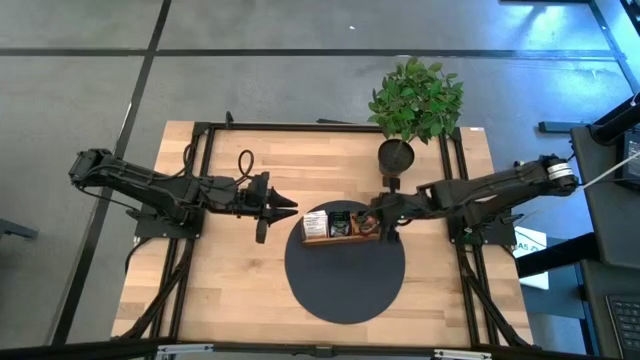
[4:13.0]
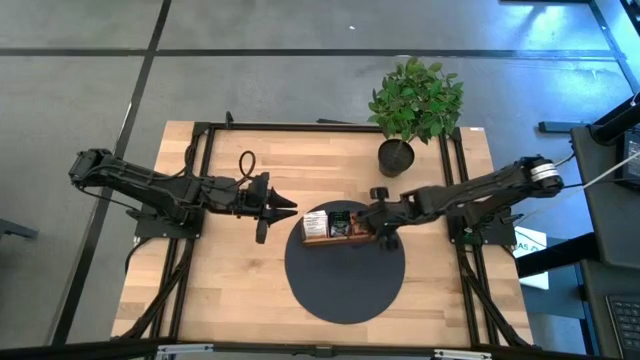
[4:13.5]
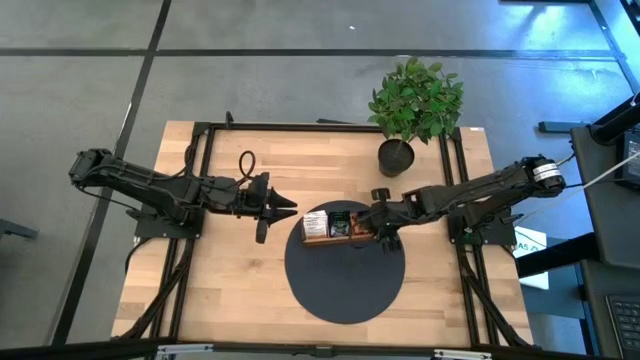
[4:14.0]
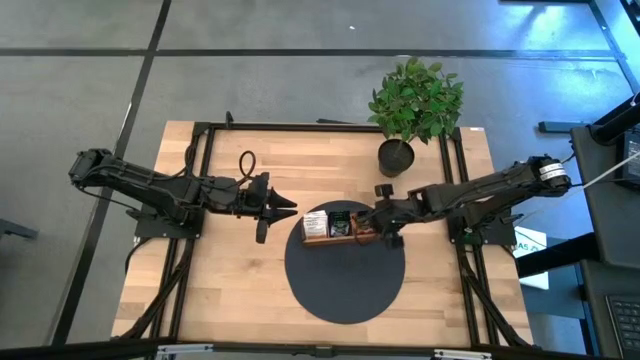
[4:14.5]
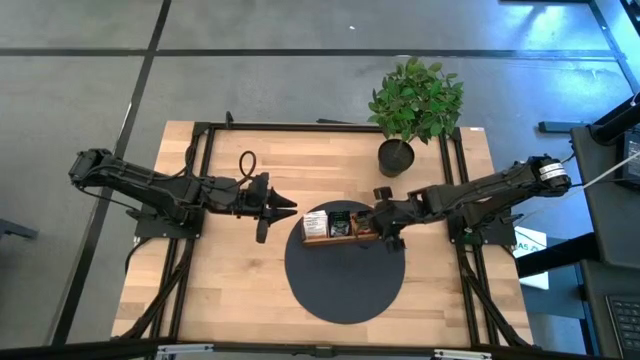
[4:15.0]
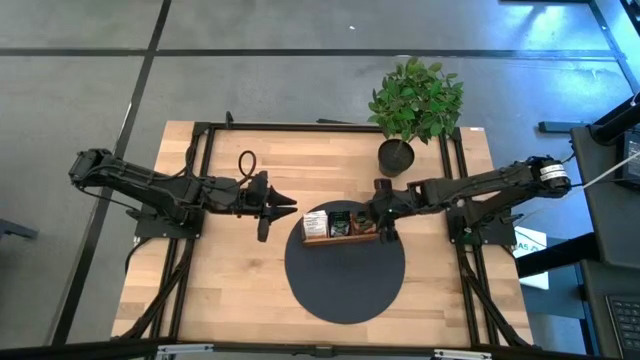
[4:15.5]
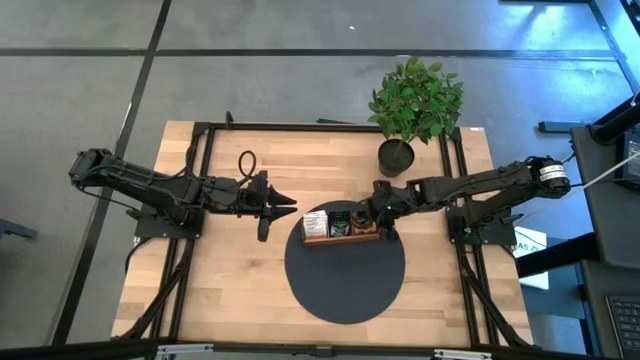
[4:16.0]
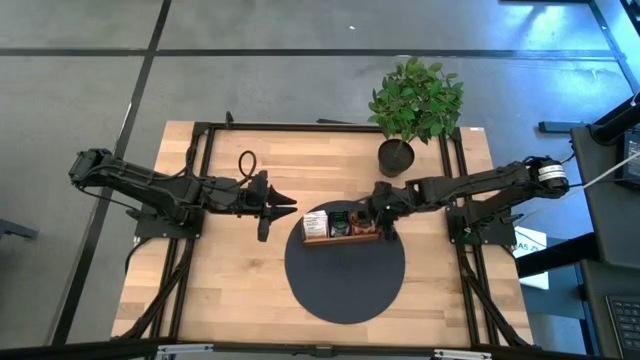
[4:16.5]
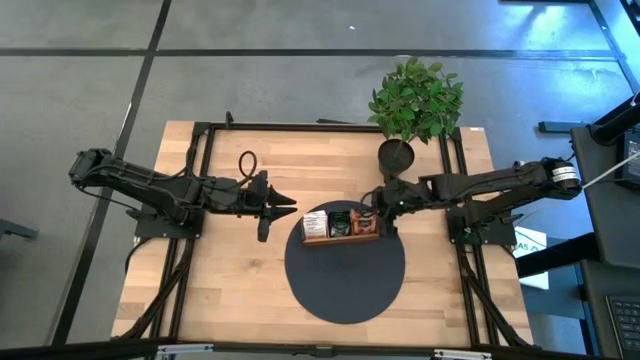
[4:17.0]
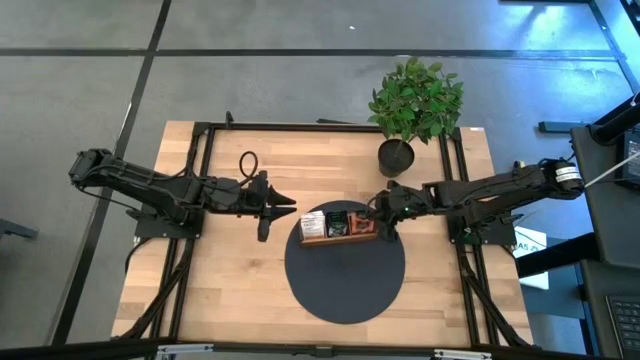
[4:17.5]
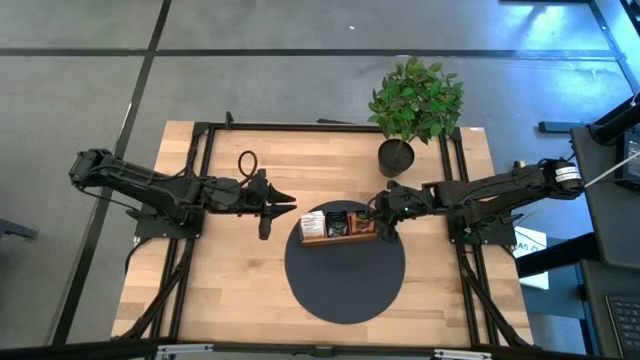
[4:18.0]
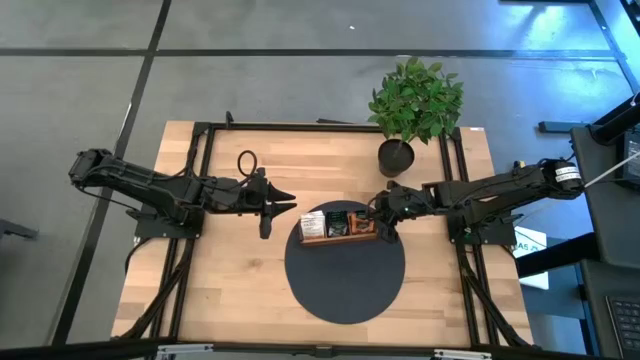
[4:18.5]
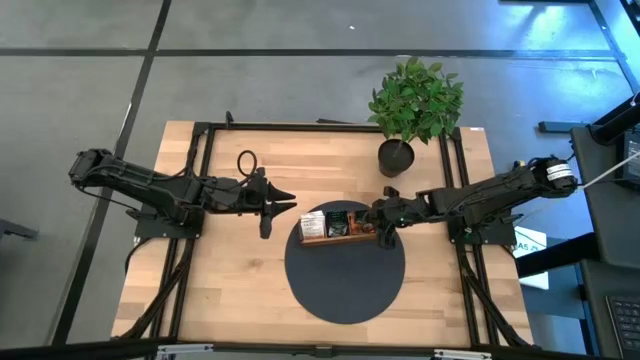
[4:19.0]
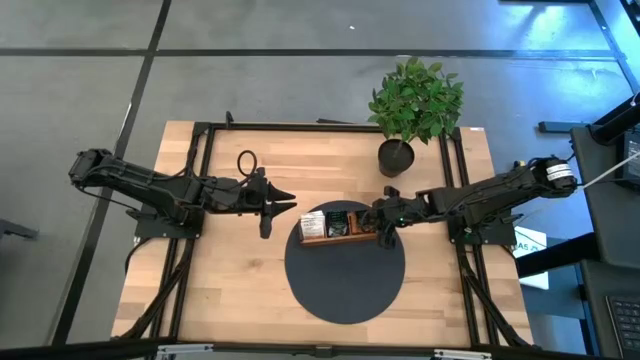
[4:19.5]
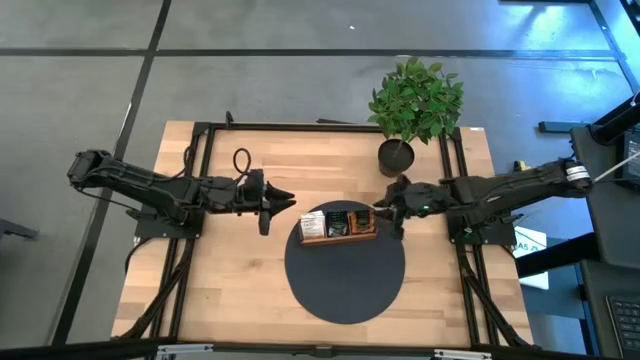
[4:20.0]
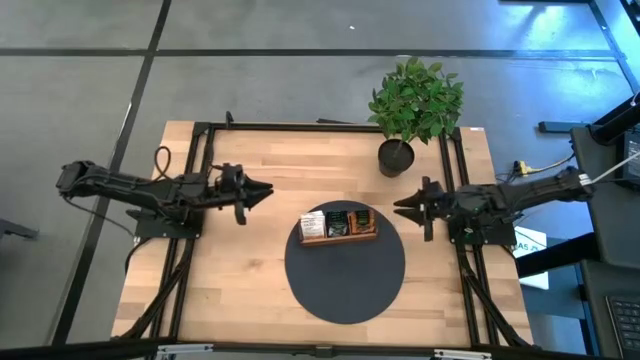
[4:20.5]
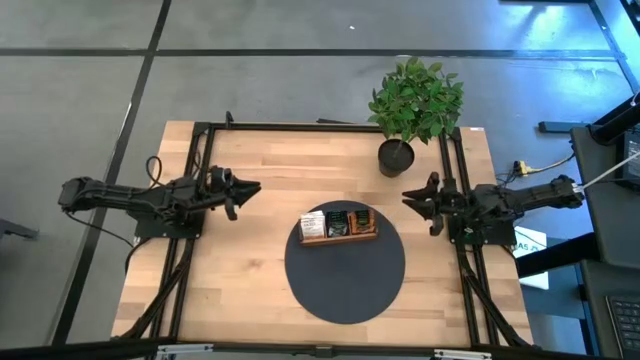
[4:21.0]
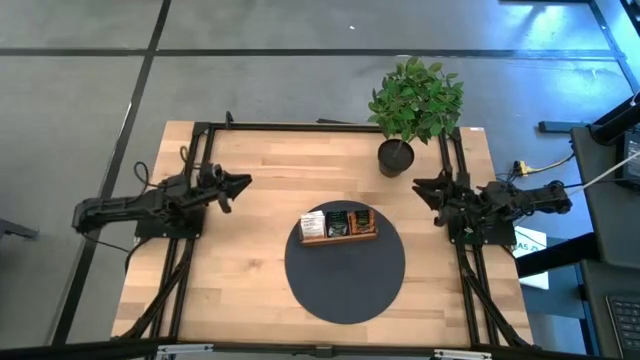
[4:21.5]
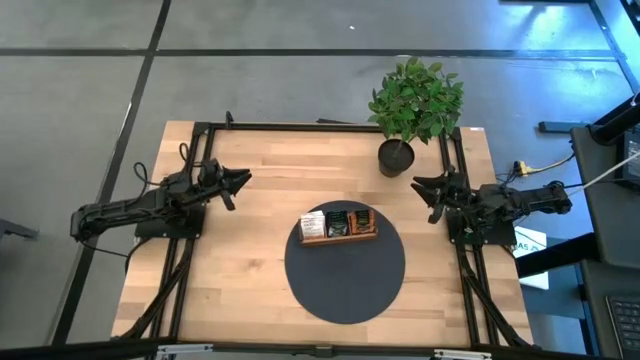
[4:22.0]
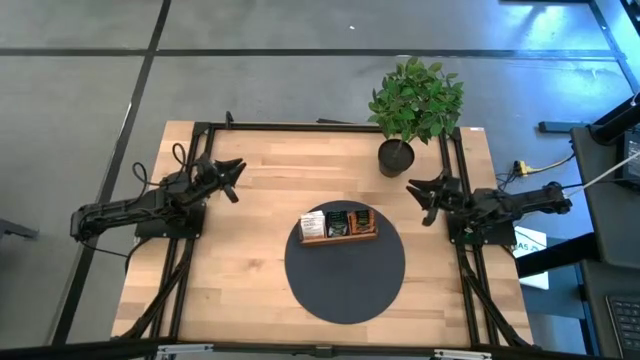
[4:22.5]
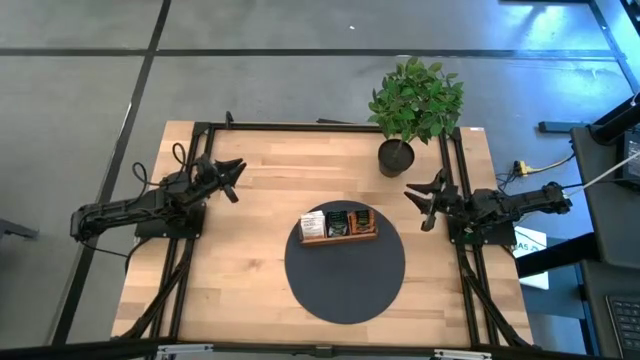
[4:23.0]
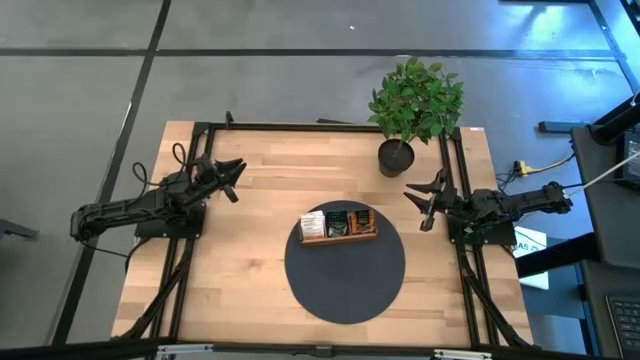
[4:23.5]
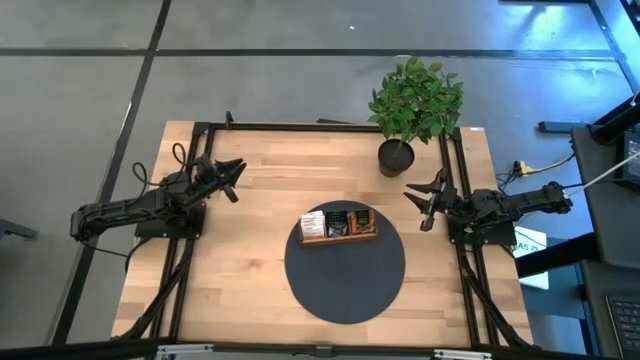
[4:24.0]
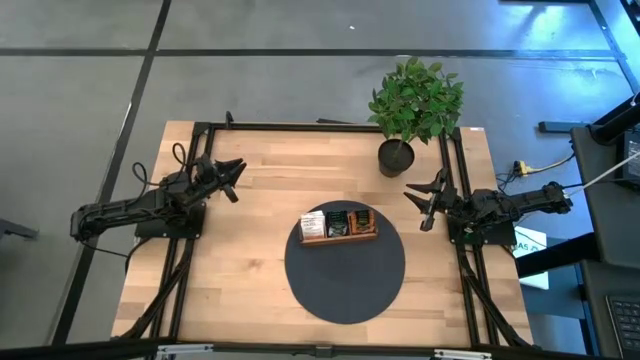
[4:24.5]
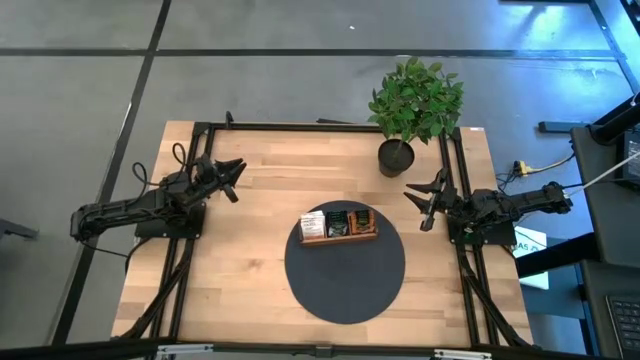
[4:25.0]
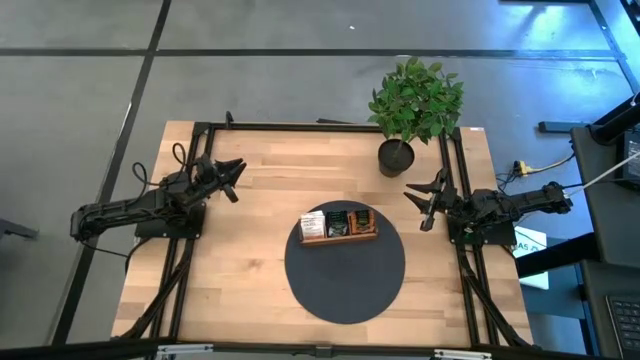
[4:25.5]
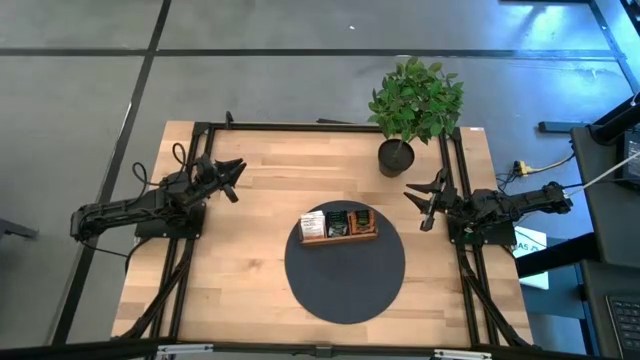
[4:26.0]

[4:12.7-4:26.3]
Task: Pick & Place Tea
Return to Home Position

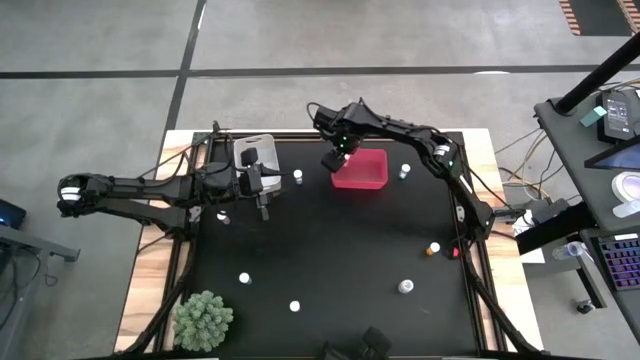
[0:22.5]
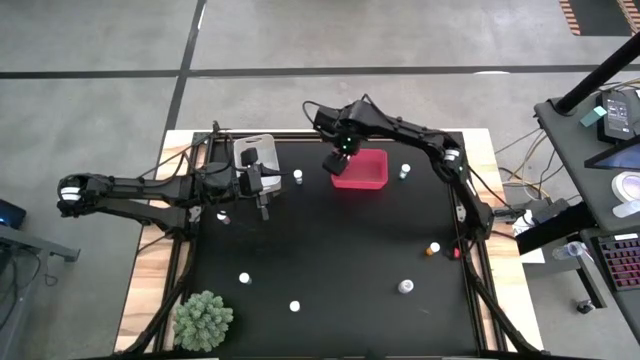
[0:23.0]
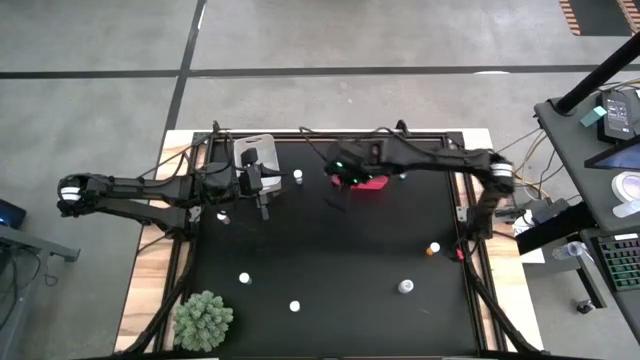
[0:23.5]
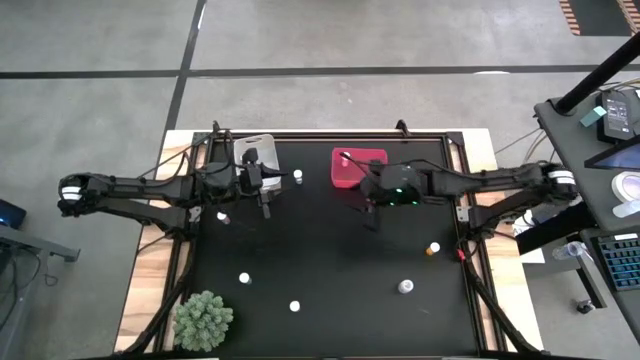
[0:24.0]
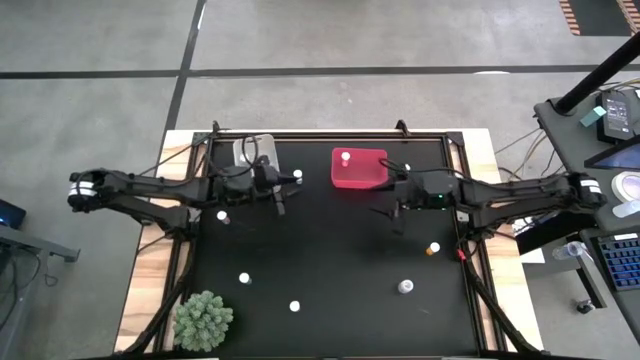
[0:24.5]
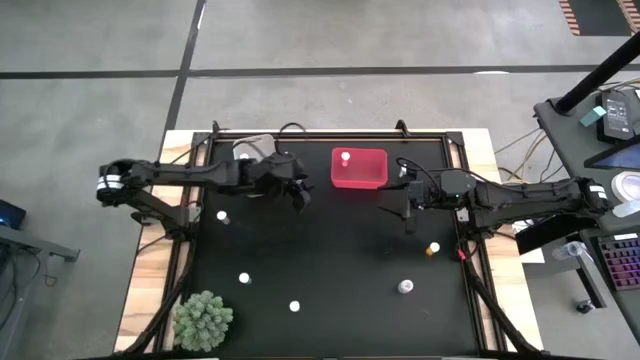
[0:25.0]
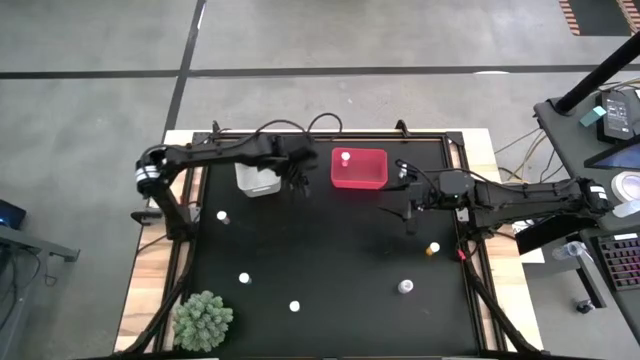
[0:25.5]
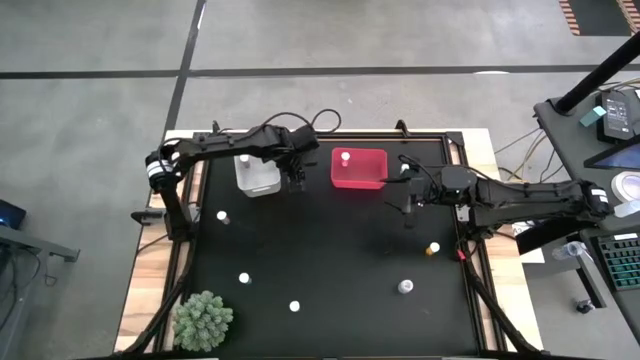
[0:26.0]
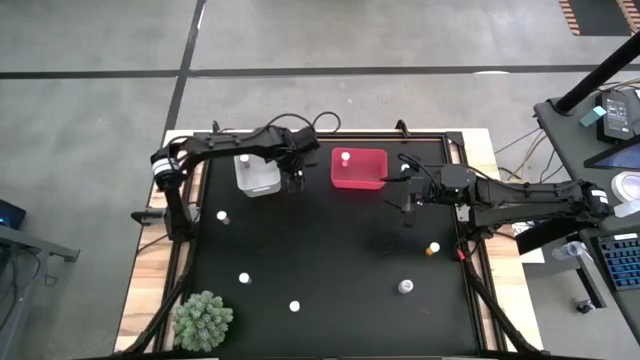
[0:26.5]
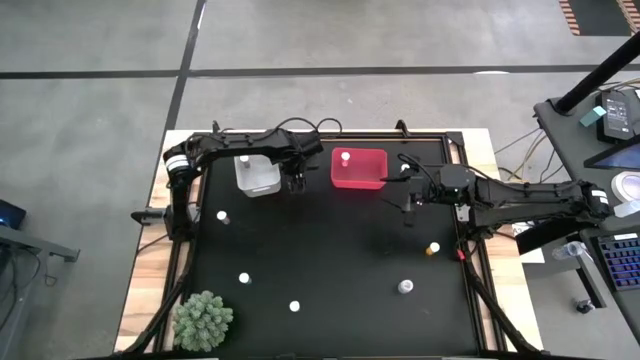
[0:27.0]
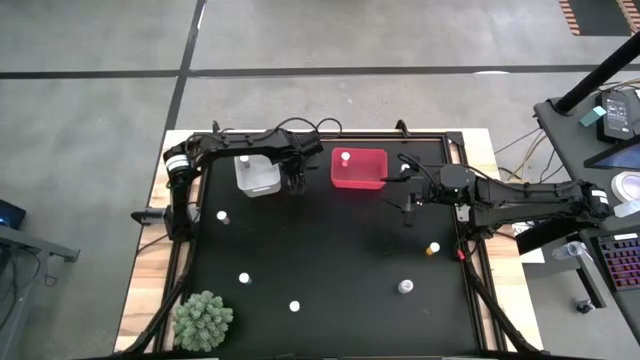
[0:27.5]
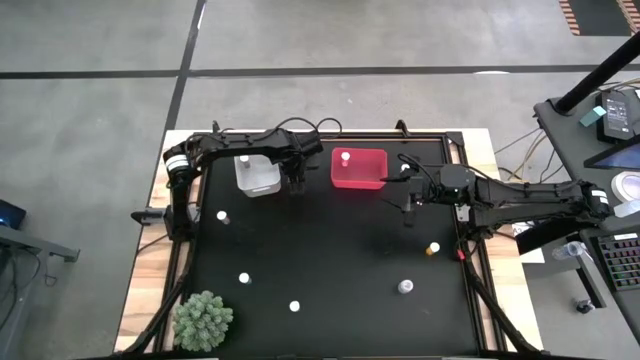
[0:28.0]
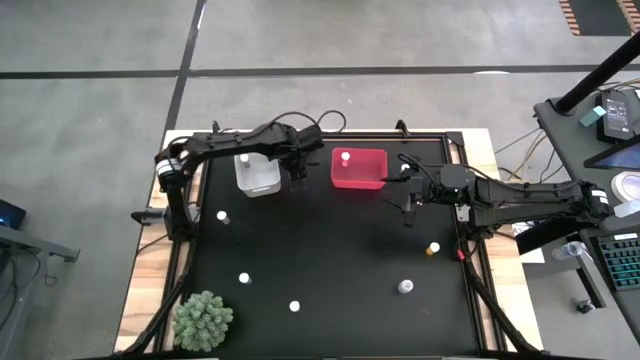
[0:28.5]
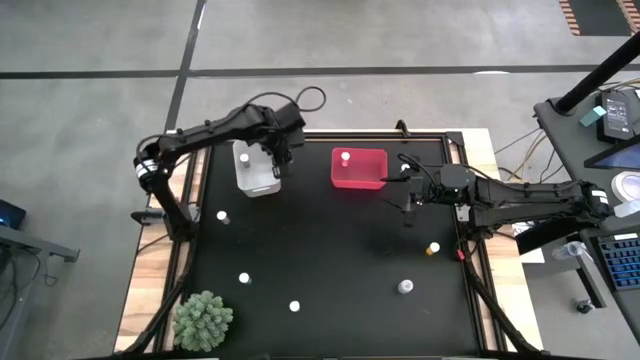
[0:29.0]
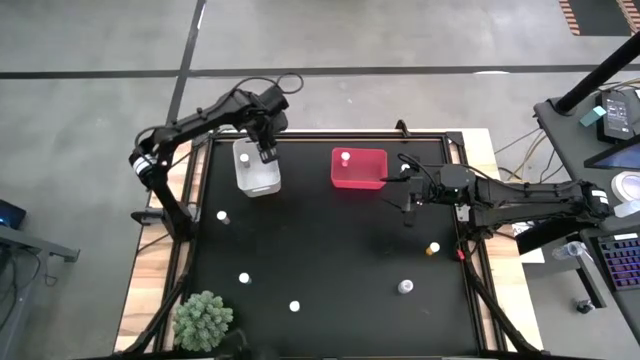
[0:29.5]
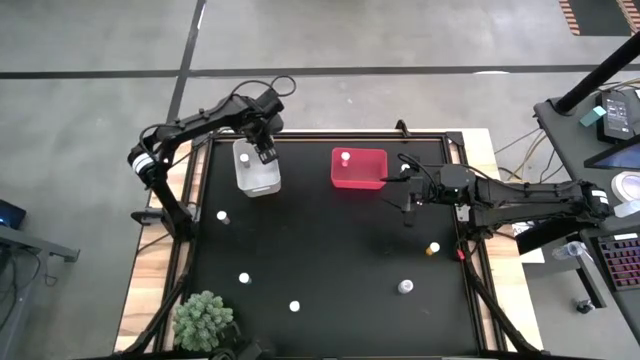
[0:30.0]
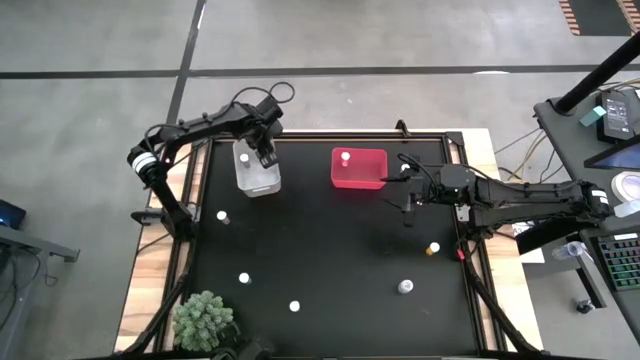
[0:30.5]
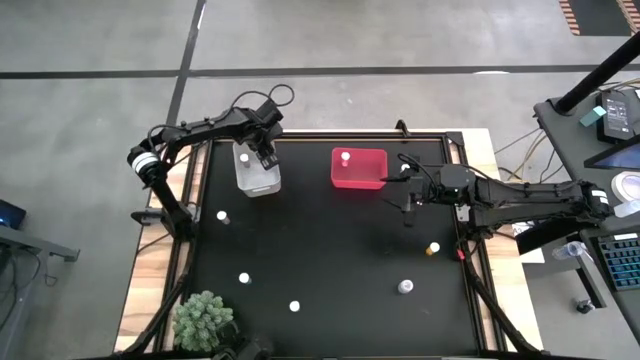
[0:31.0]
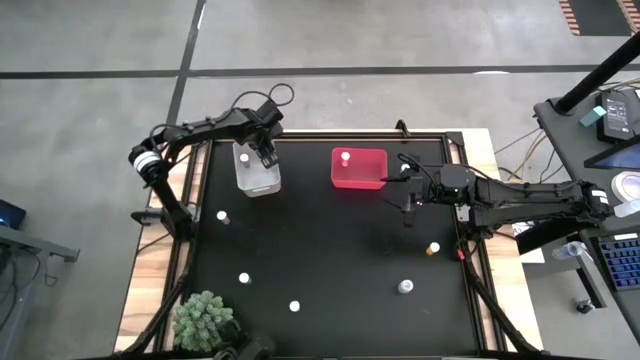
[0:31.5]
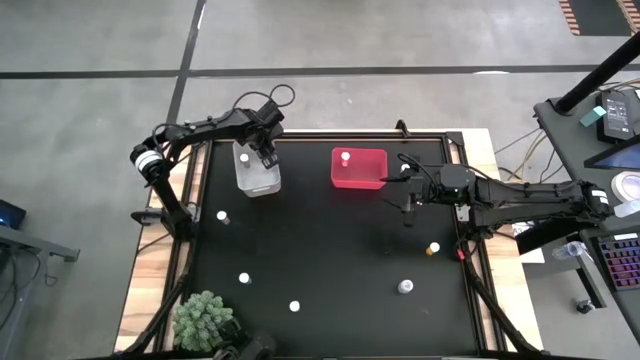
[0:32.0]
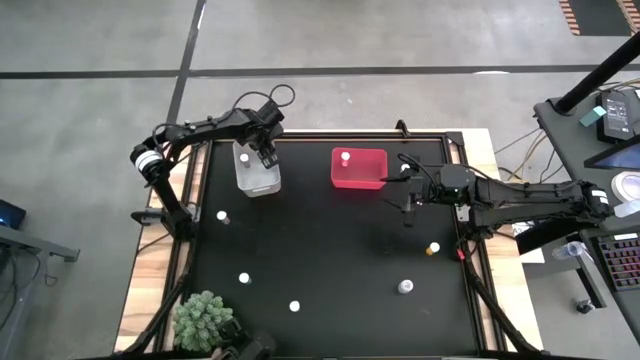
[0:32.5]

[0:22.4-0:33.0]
Task: Pick and place medicine bottles into bin by pill shape (circle, oval)
Put the blue capsule bottle into the gray bin
